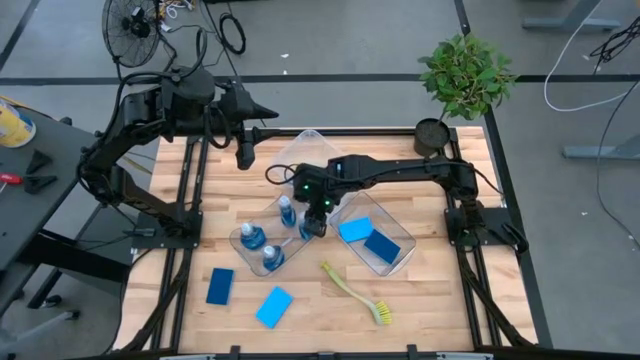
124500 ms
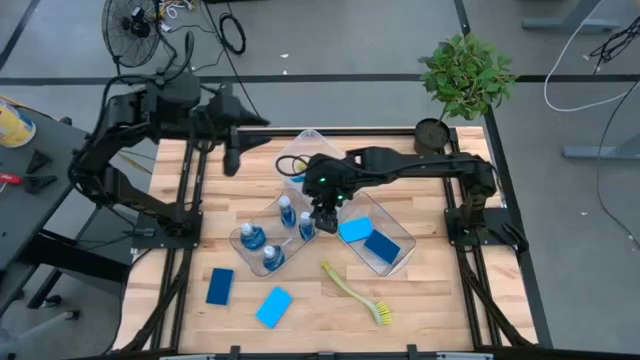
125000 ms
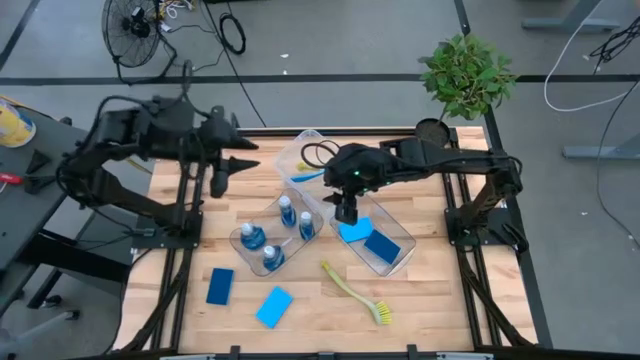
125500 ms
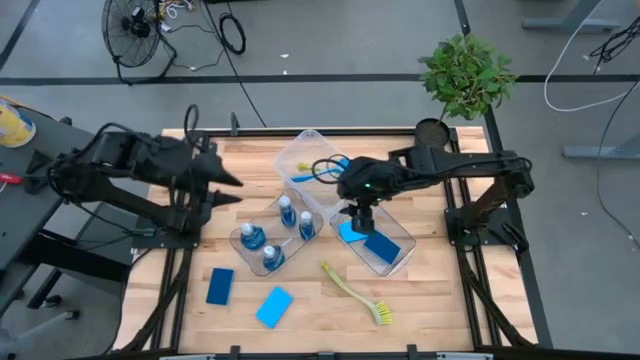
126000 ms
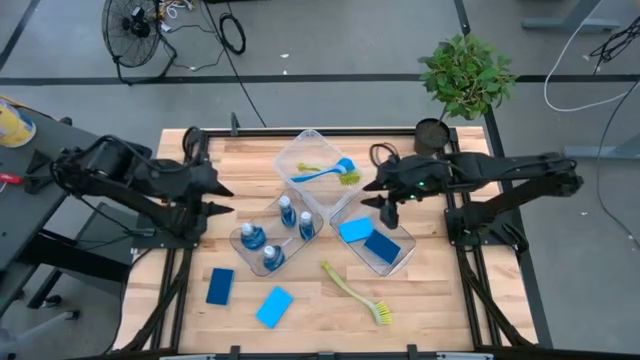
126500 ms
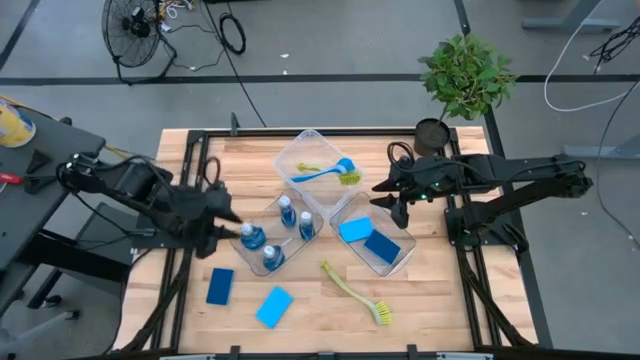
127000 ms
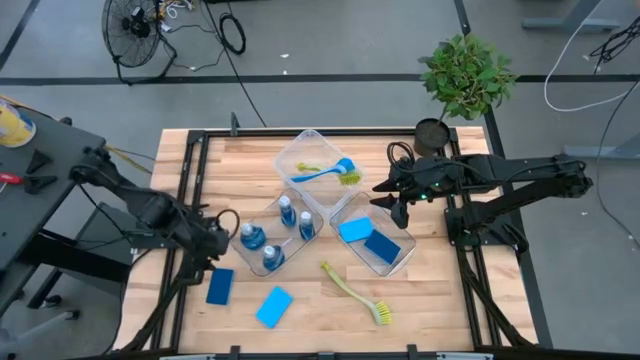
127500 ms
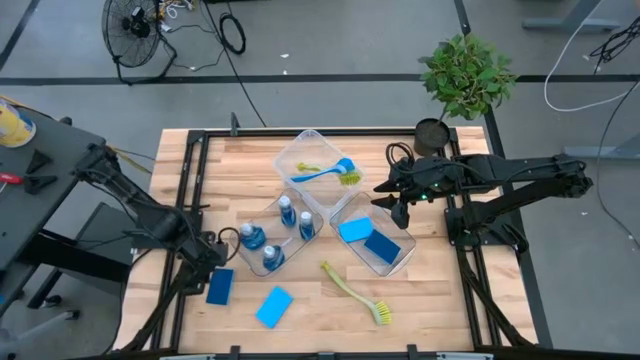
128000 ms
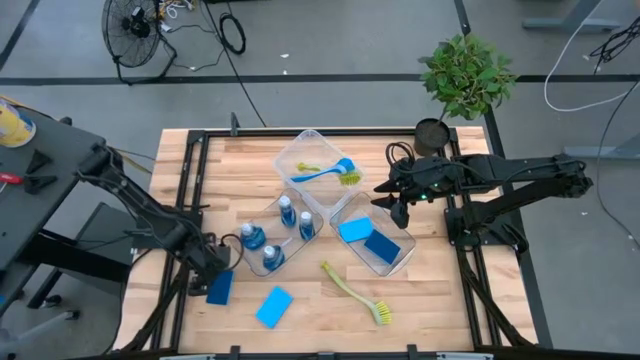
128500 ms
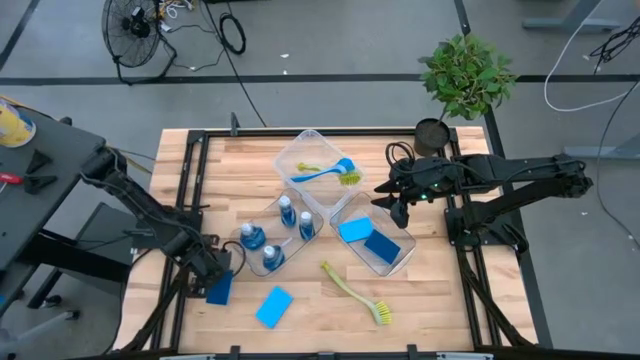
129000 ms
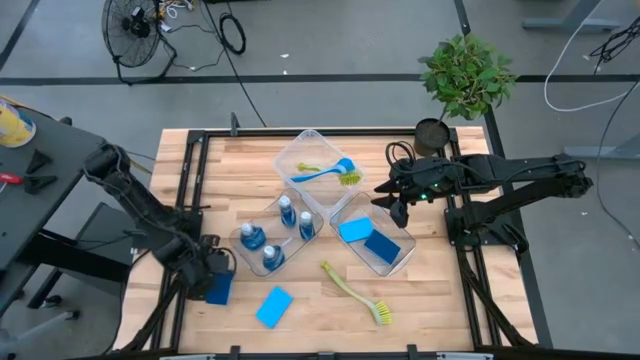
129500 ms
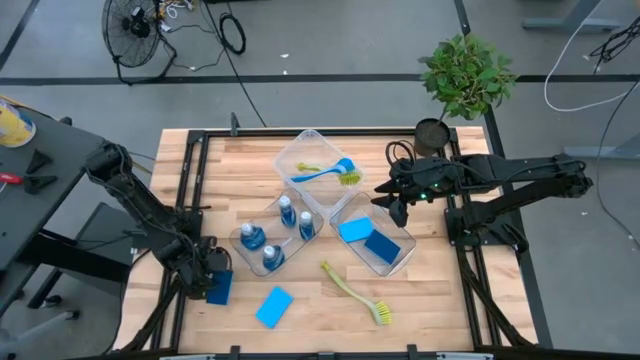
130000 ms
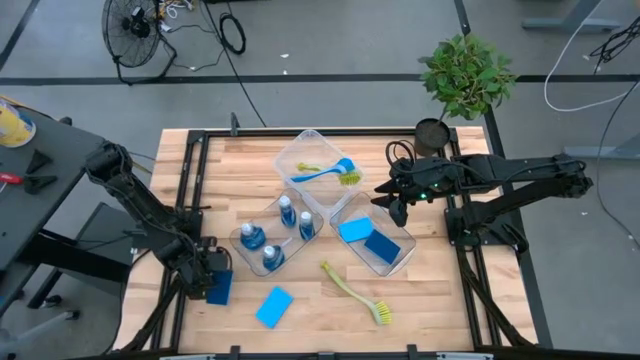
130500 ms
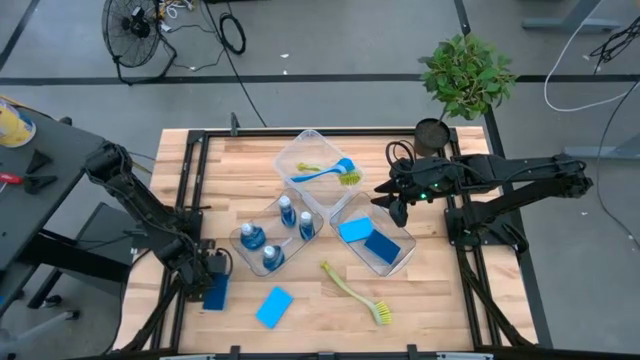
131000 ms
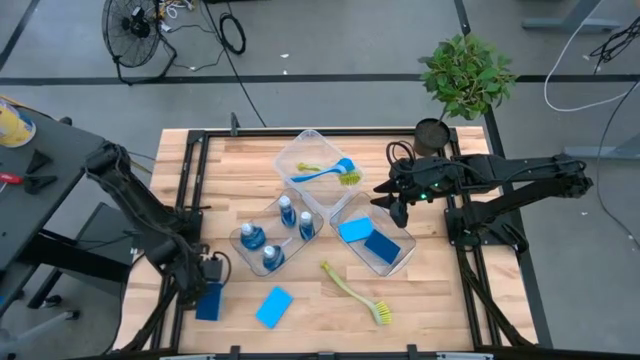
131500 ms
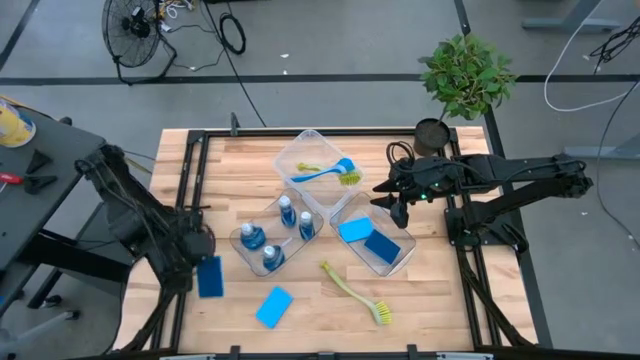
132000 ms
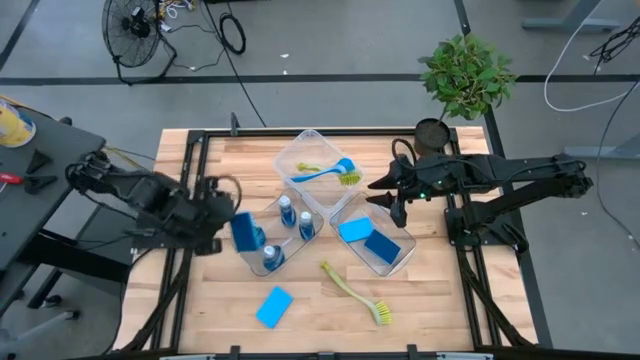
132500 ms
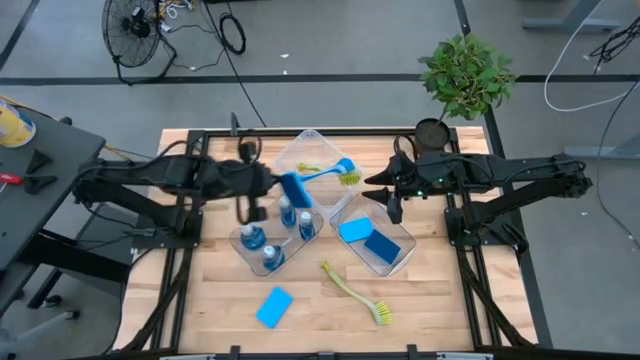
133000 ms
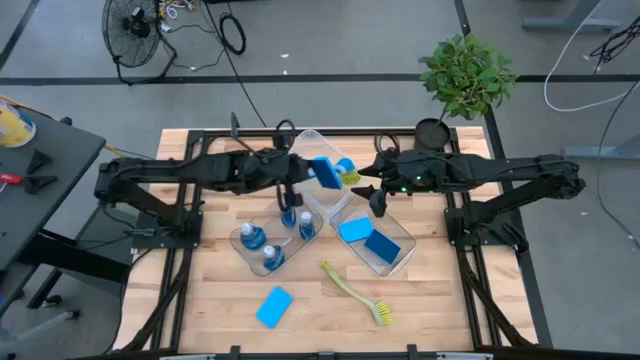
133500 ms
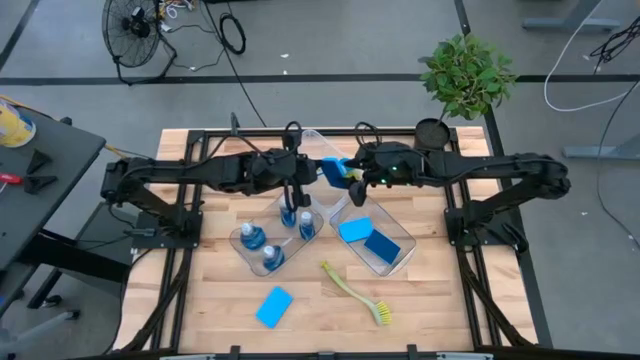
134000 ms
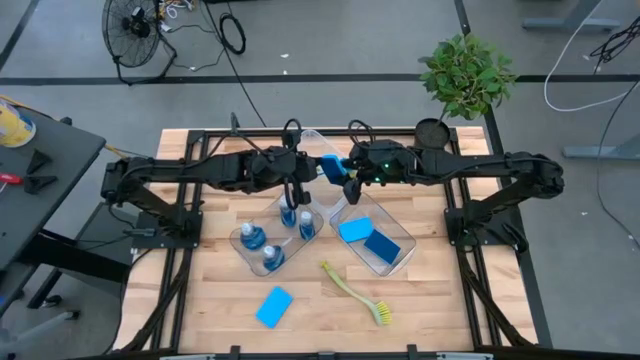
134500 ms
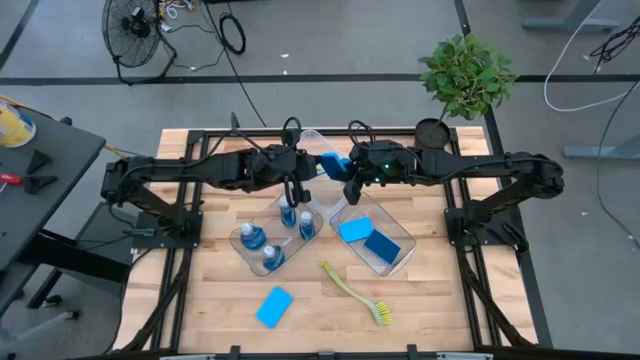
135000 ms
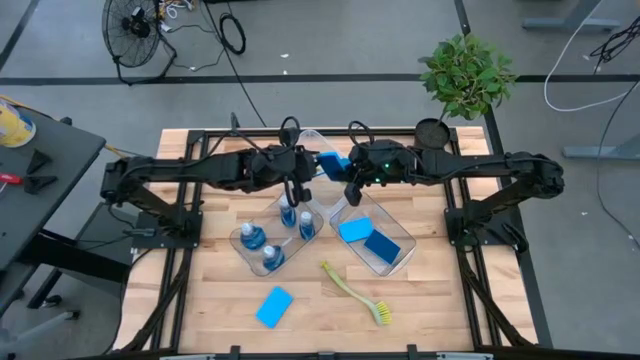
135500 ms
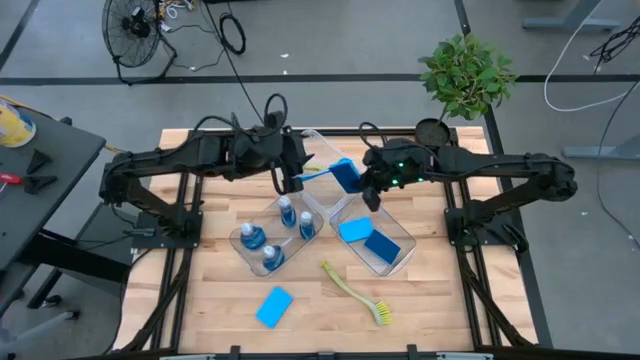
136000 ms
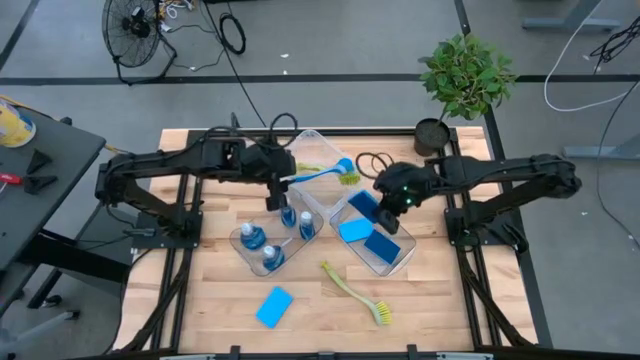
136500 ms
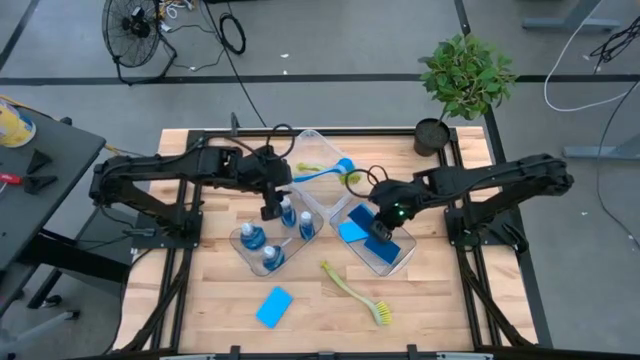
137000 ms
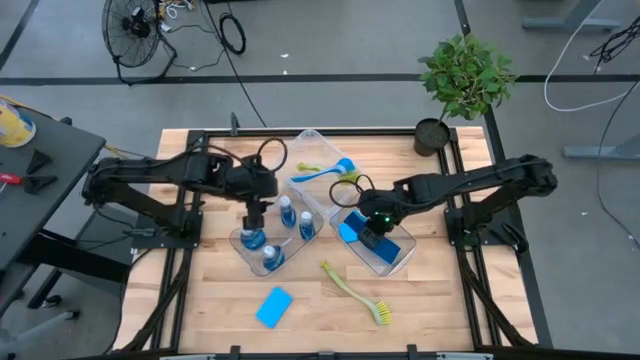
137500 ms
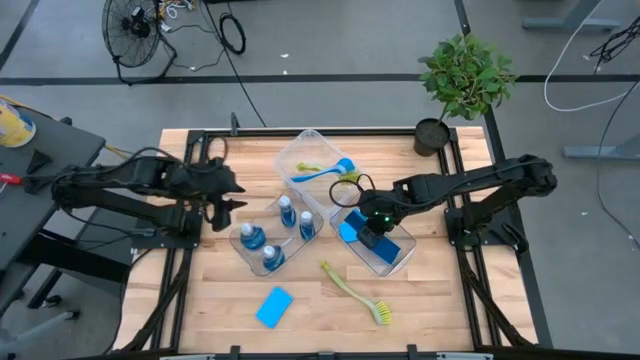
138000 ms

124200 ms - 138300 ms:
Task: Pick & Place Kitchen Sink Supplies
Put the blue sponge into the right transparent bin

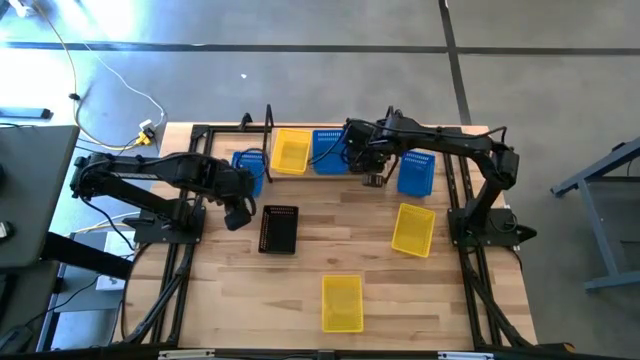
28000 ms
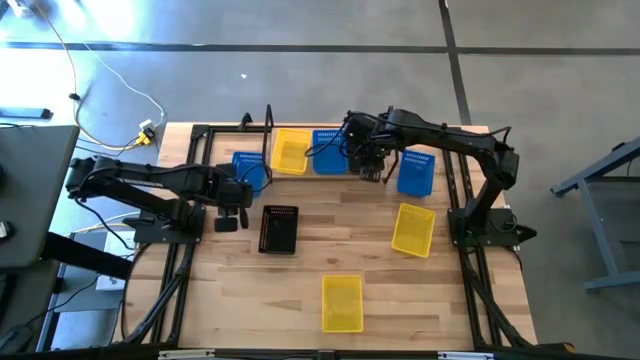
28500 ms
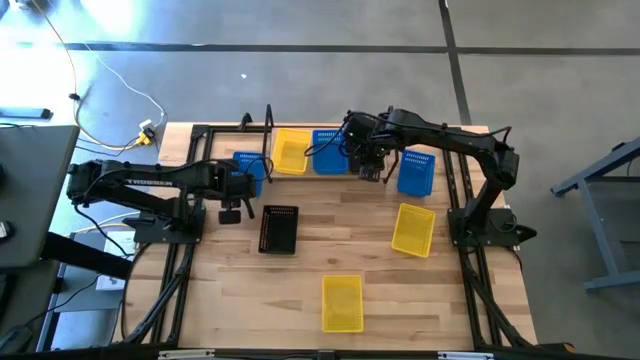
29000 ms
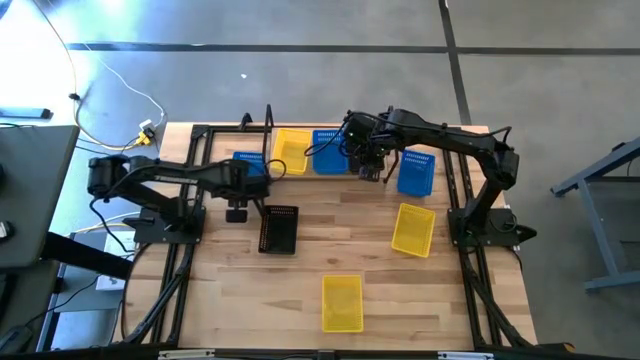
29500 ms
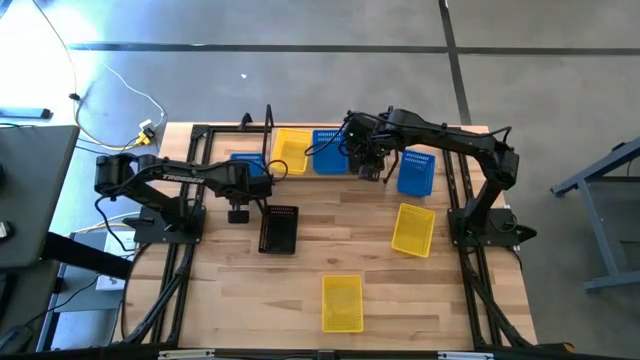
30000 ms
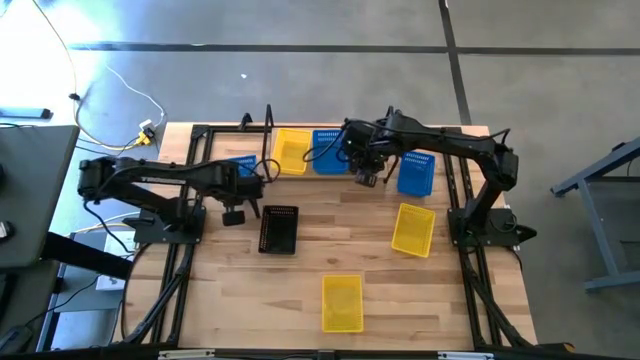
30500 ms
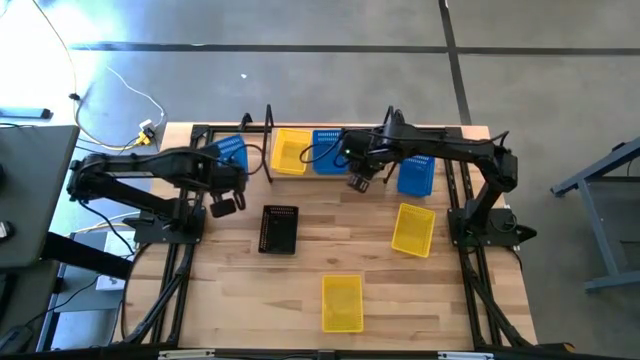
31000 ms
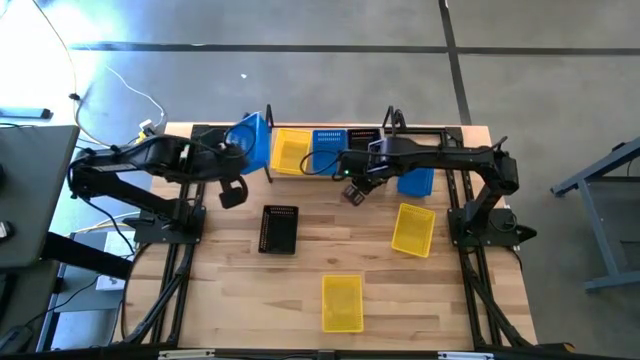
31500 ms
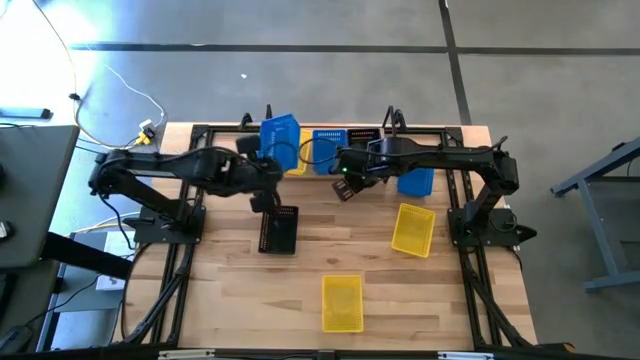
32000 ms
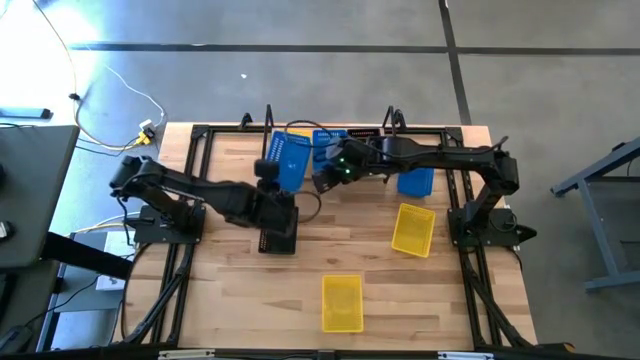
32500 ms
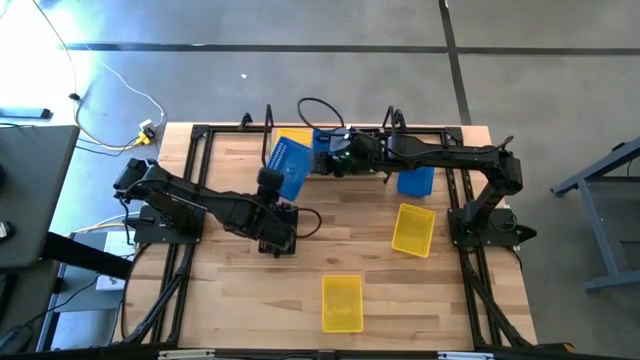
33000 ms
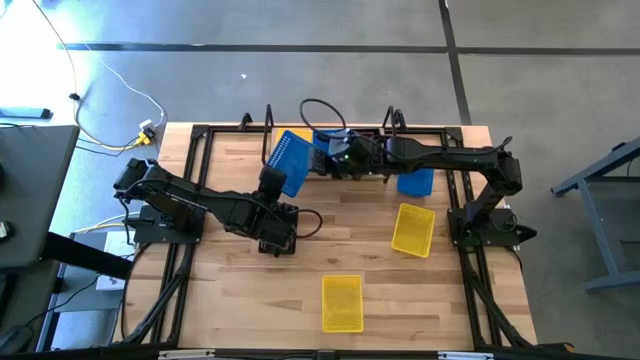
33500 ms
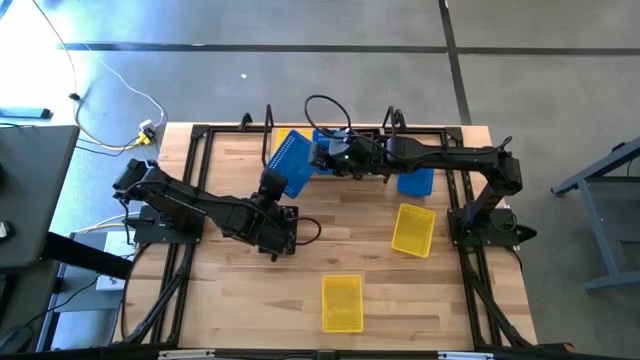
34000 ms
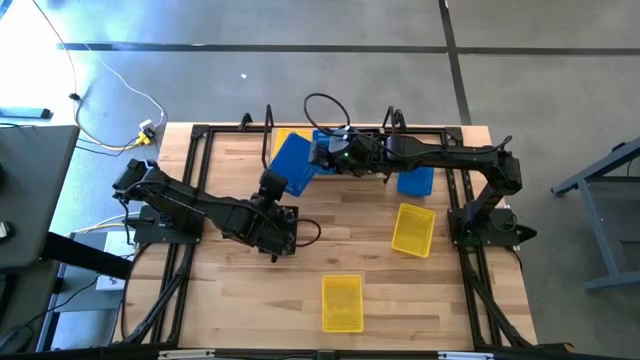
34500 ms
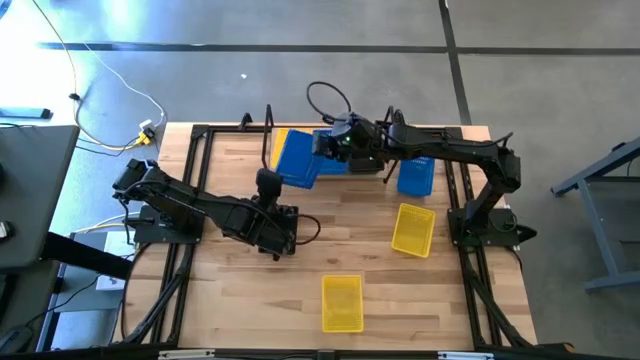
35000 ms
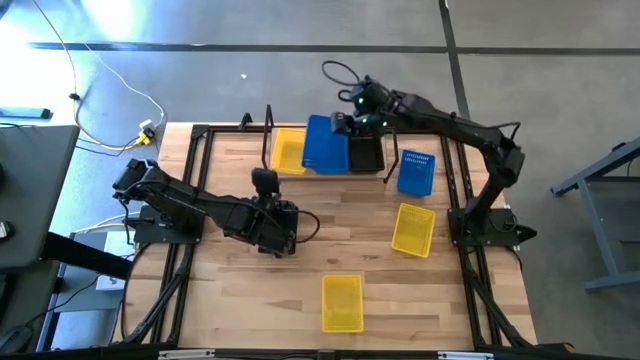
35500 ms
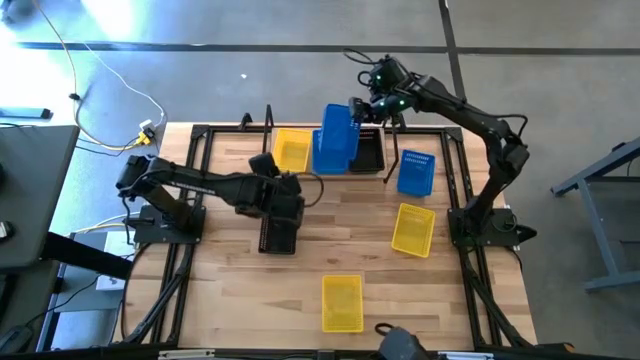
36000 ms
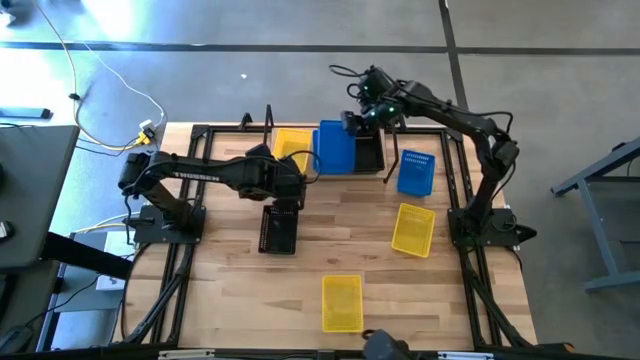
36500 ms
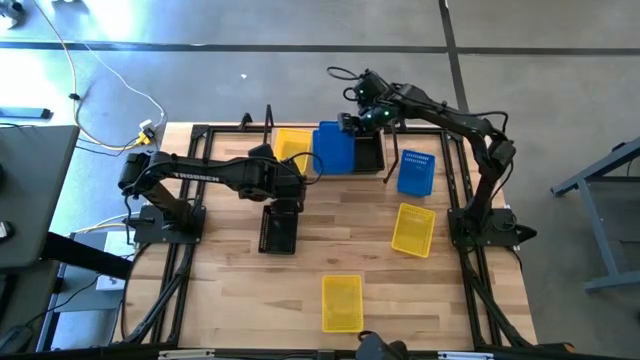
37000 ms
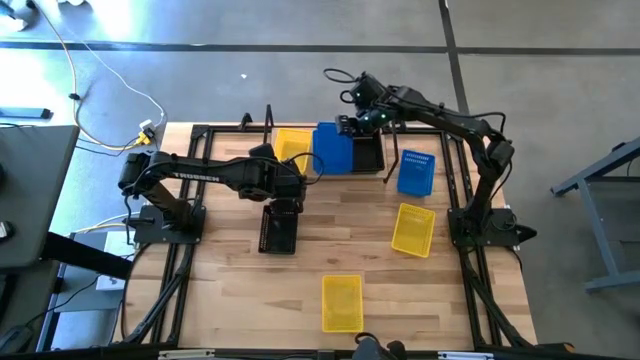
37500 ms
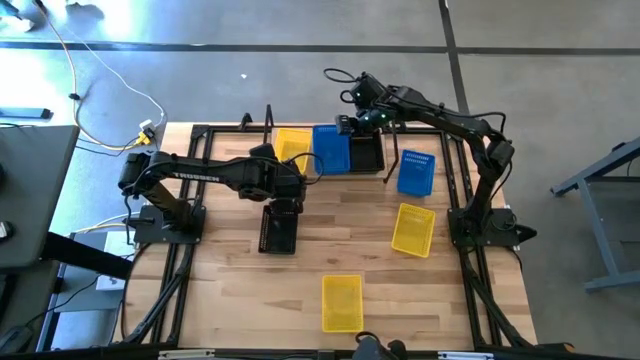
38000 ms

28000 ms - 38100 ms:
Task: Stack baskets on shelf by color
Stack the left blue basket on the blue basket on the shelf
